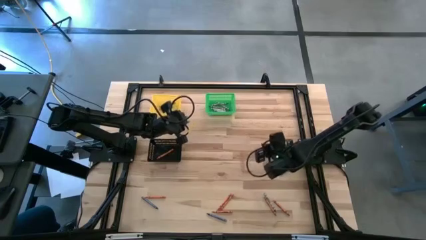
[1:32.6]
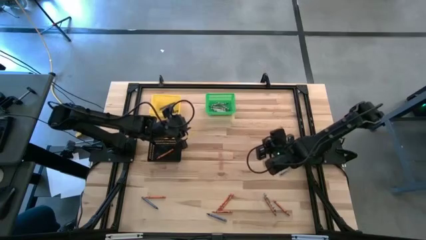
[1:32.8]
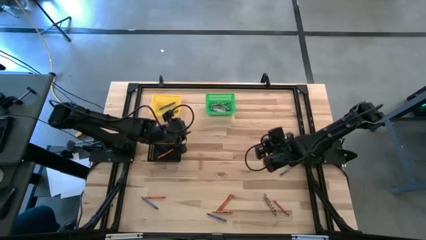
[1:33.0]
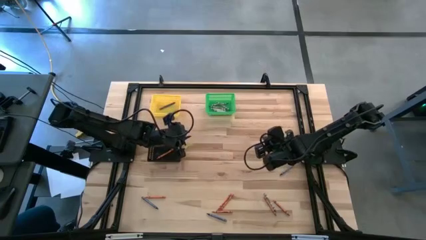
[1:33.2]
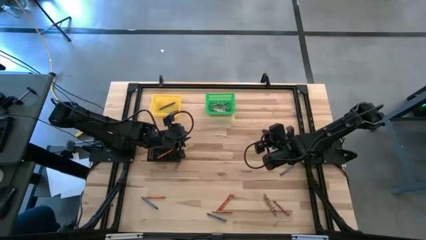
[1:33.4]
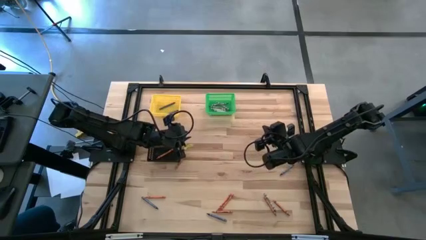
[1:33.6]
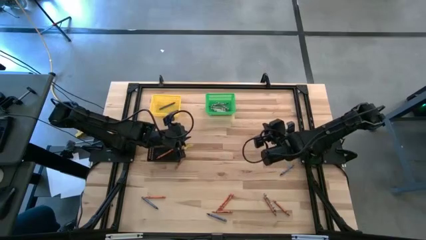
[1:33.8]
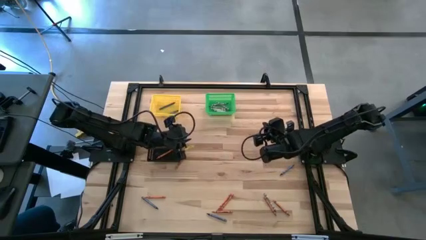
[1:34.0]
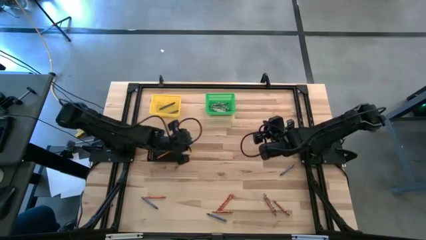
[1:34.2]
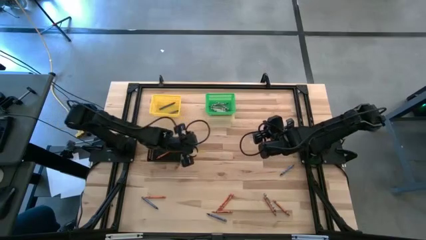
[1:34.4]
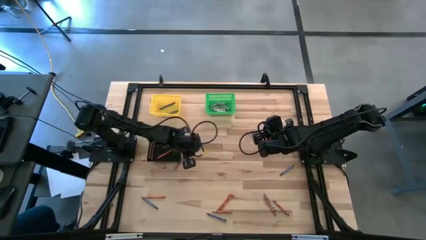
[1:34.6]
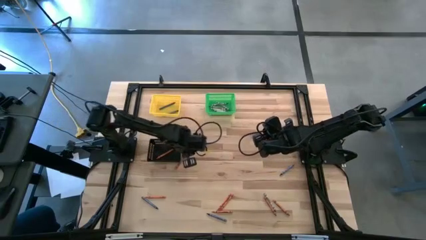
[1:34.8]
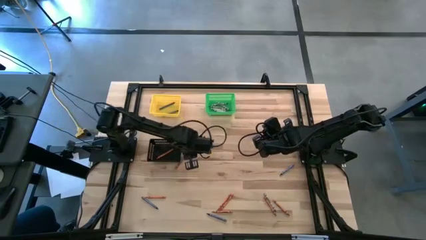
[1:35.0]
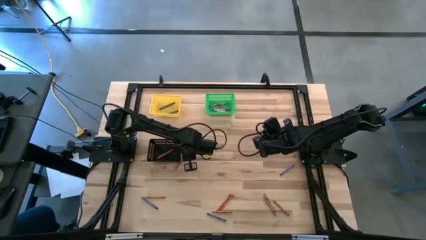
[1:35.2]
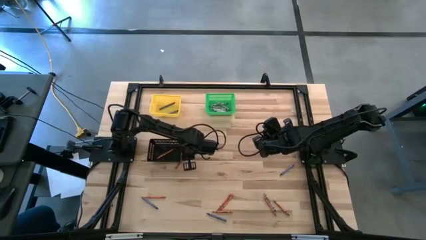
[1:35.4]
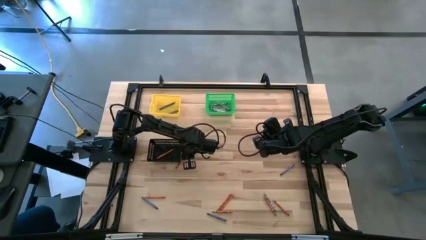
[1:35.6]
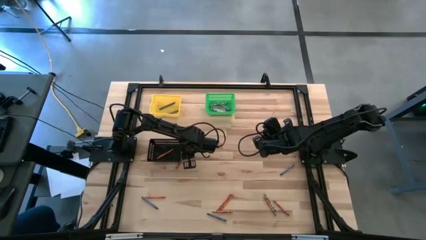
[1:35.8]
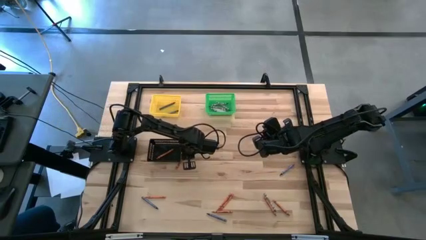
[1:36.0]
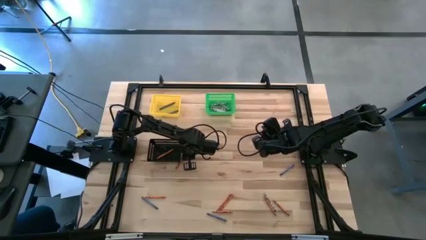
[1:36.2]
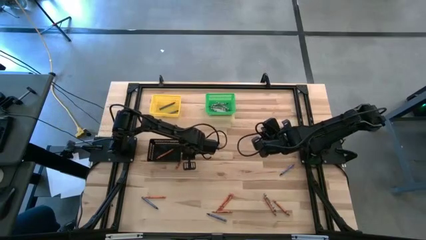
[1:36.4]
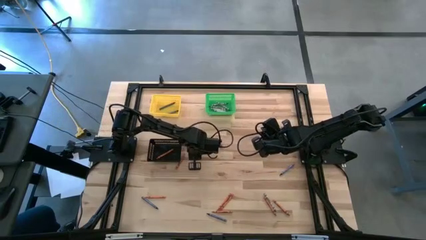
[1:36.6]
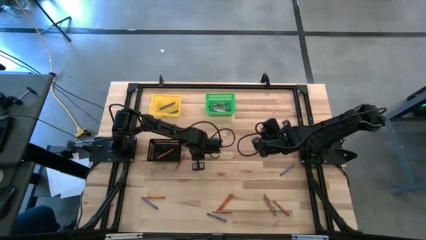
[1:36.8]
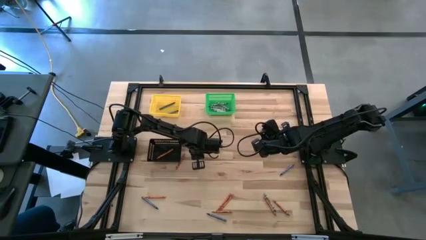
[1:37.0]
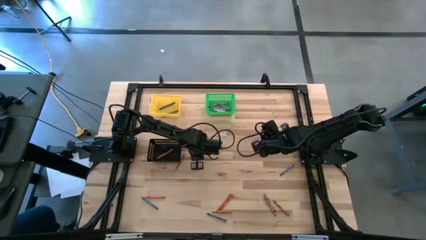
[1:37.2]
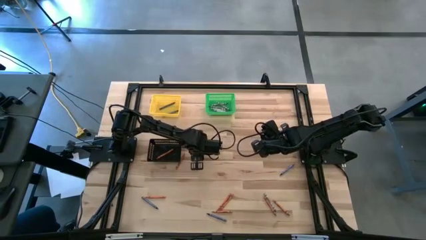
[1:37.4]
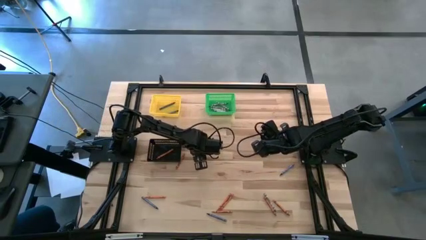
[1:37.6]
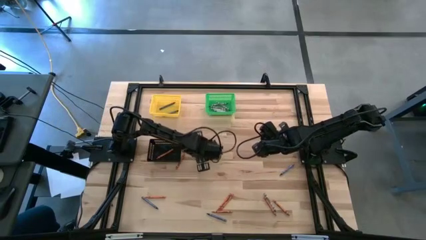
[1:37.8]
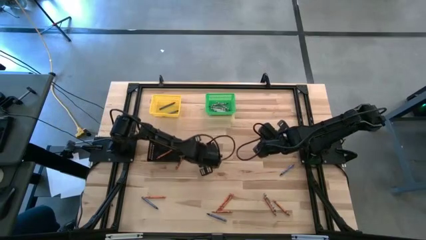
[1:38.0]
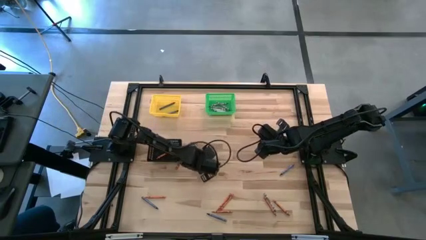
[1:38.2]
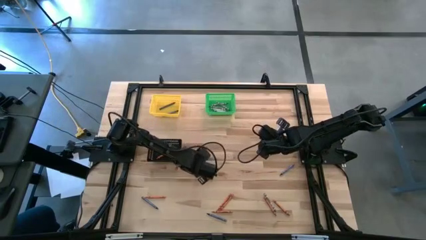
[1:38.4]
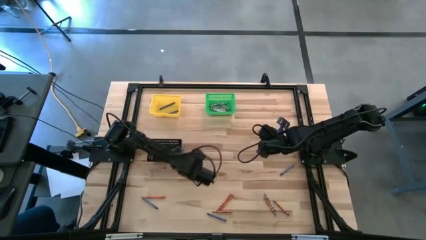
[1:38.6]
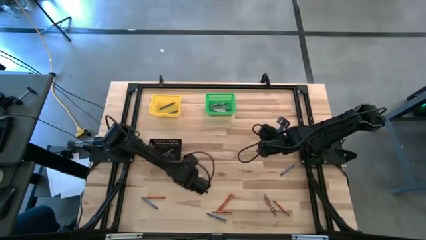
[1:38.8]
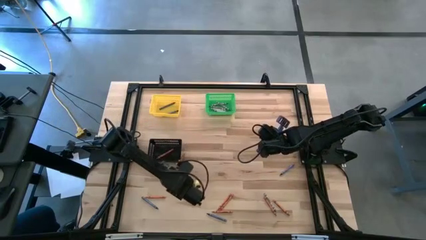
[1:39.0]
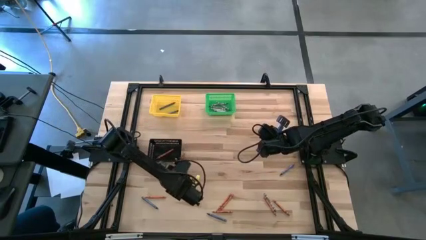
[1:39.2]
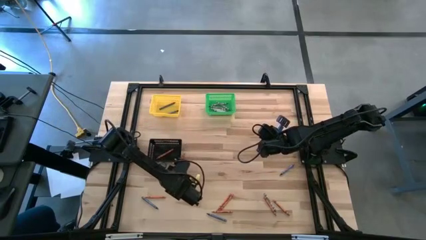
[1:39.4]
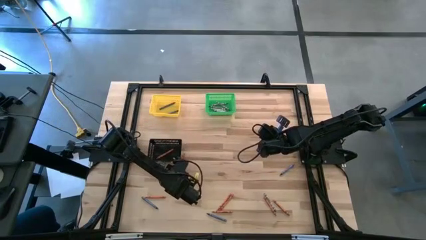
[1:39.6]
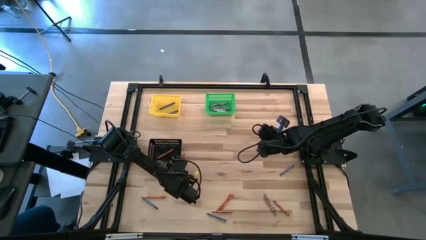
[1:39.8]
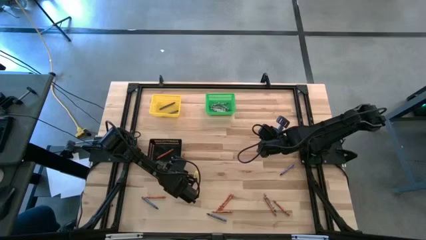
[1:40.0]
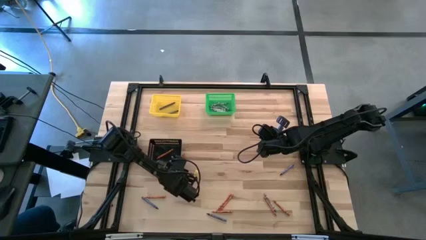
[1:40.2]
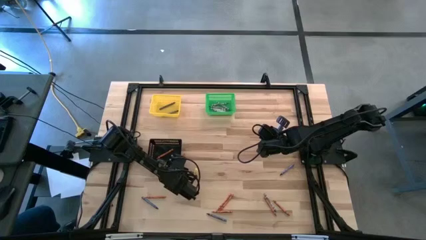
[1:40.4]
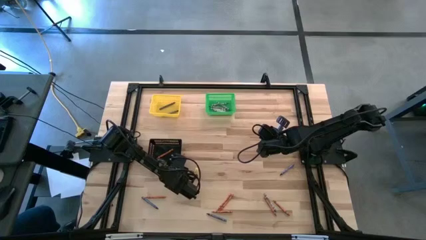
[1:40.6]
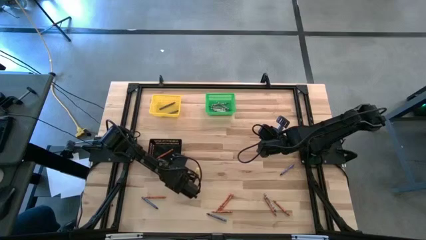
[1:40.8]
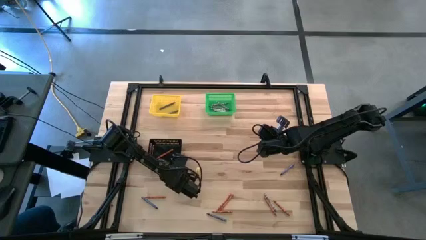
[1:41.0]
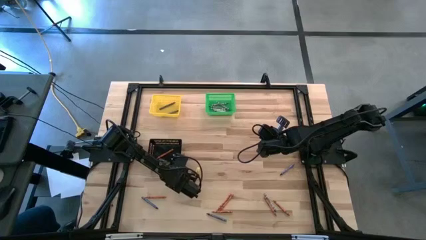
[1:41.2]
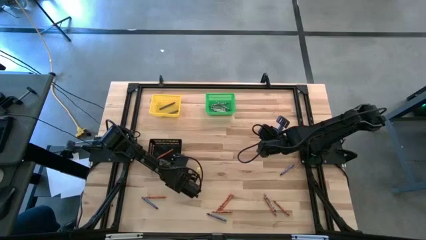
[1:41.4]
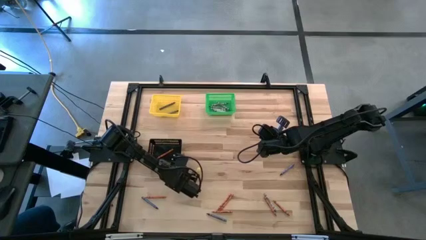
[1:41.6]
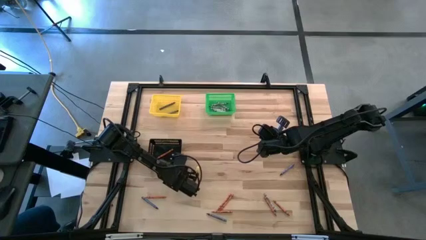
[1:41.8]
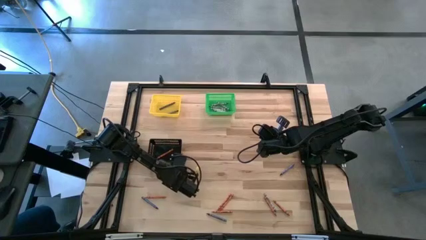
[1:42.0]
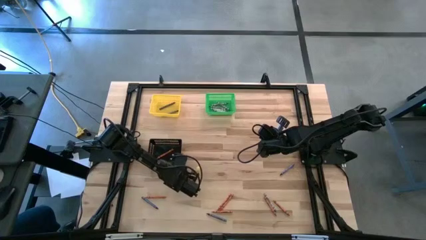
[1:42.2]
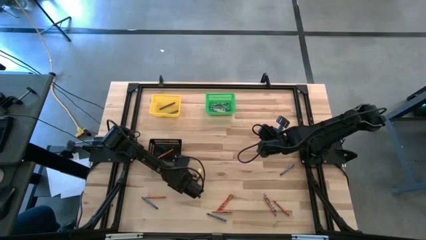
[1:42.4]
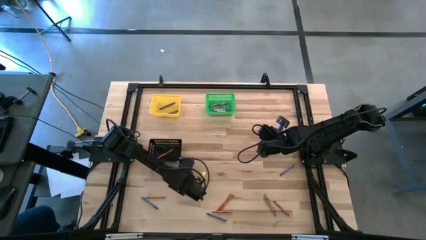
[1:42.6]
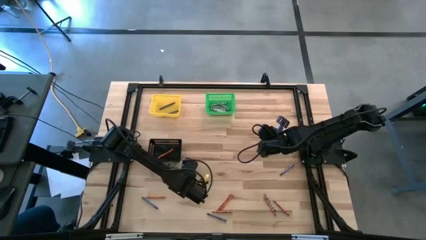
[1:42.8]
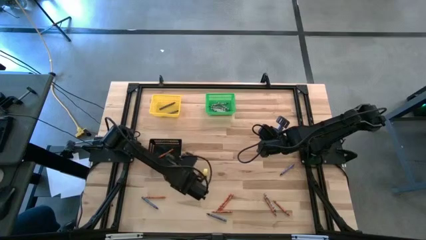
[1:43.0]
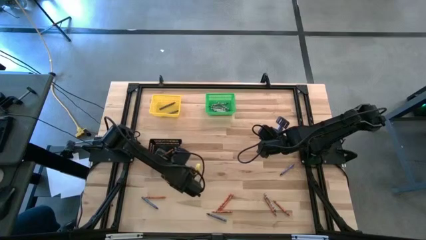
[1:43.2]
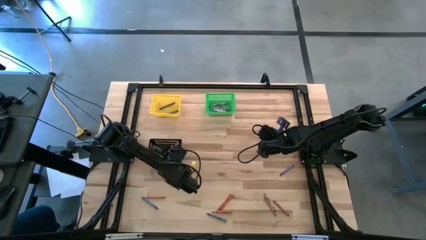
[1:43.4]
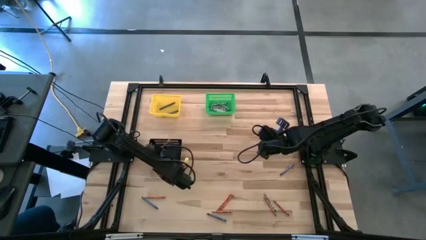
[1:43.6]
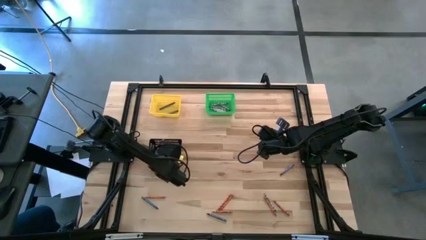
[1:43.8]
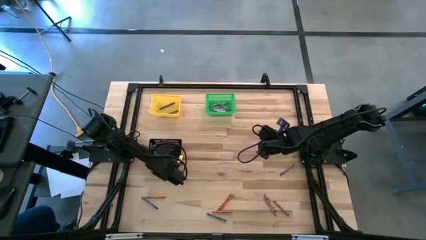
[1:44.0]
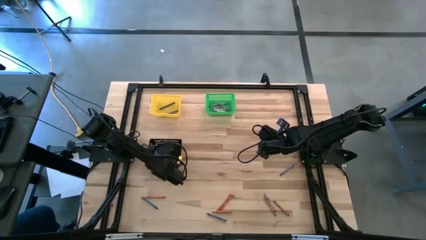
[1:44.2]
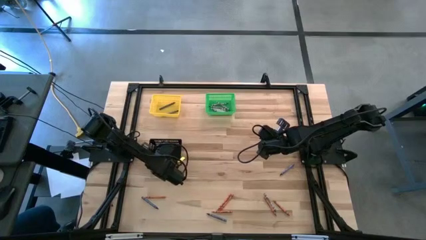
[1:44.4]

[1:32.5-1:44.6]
Task: Sort crayons
Put the orange crayon into the black bin

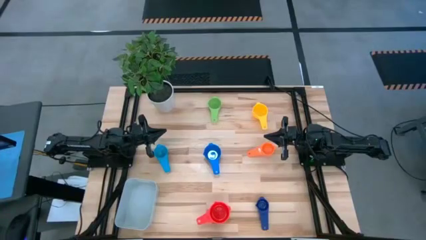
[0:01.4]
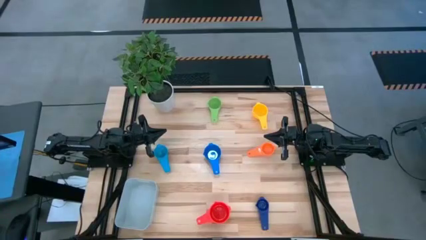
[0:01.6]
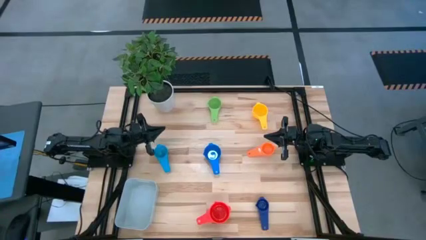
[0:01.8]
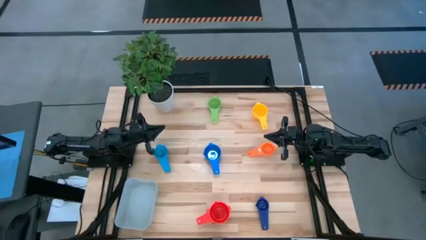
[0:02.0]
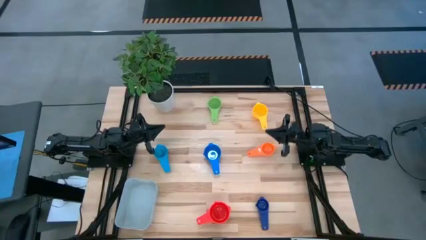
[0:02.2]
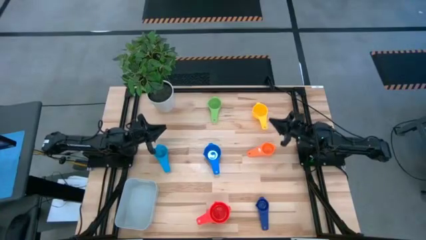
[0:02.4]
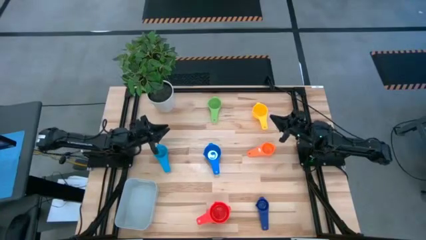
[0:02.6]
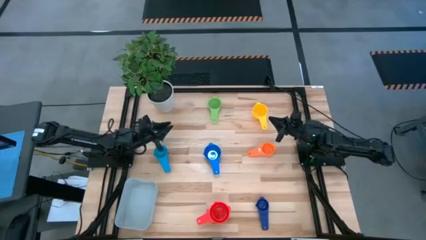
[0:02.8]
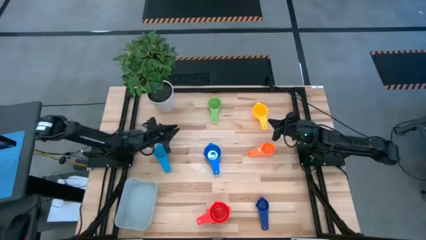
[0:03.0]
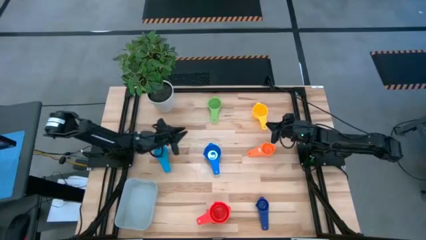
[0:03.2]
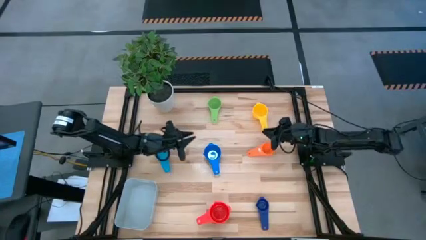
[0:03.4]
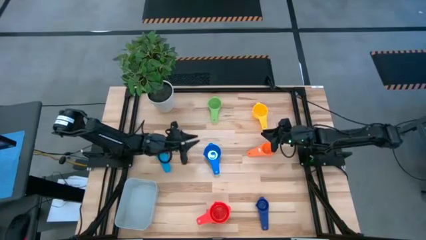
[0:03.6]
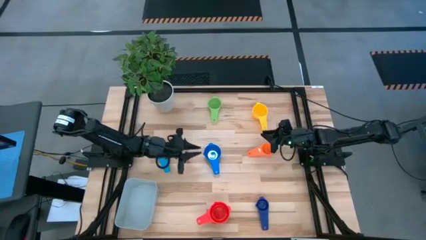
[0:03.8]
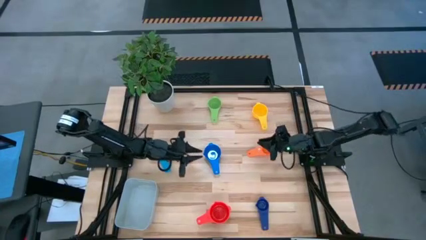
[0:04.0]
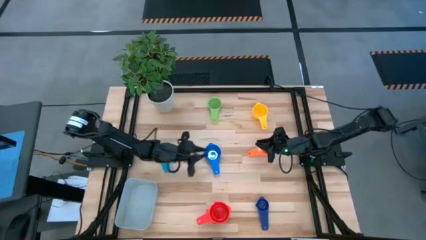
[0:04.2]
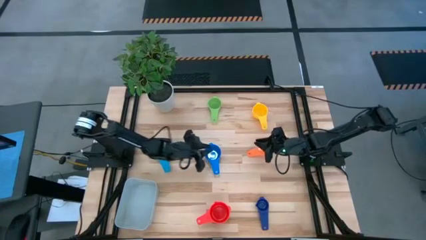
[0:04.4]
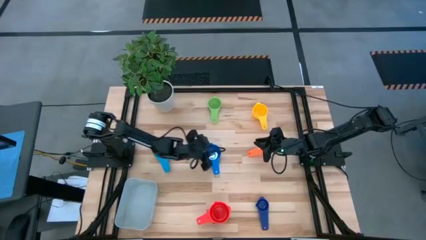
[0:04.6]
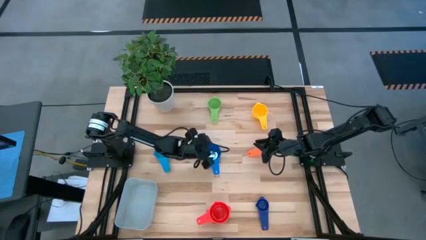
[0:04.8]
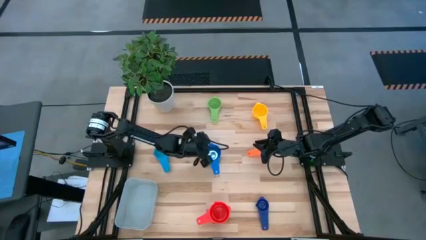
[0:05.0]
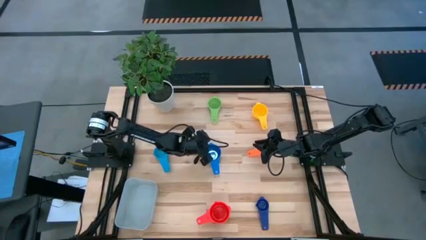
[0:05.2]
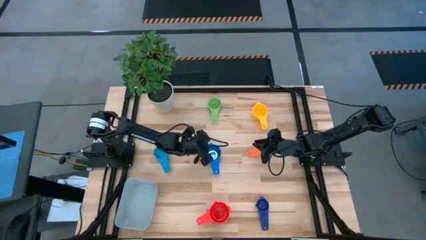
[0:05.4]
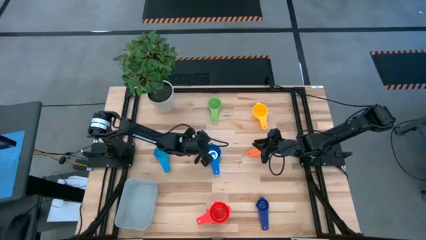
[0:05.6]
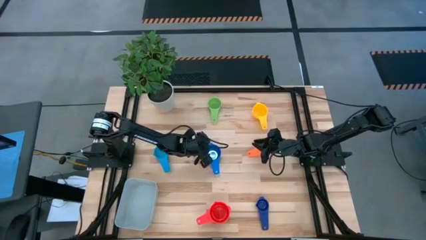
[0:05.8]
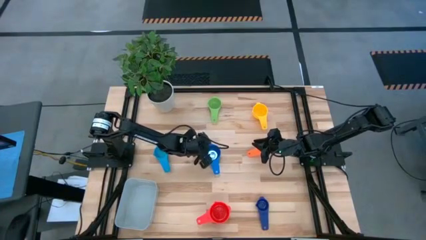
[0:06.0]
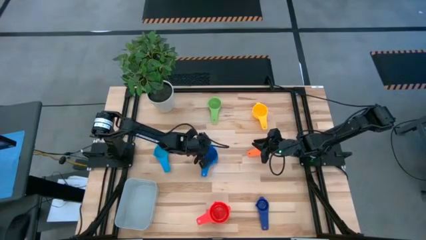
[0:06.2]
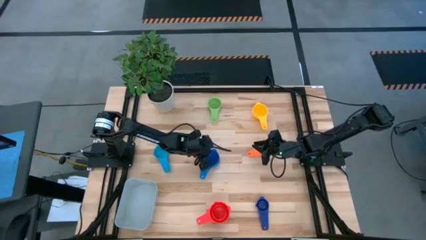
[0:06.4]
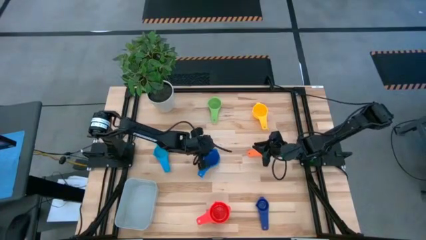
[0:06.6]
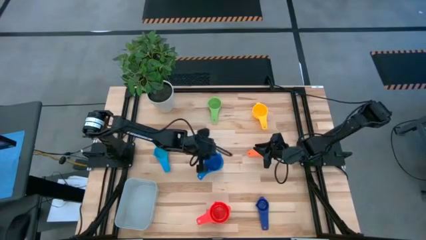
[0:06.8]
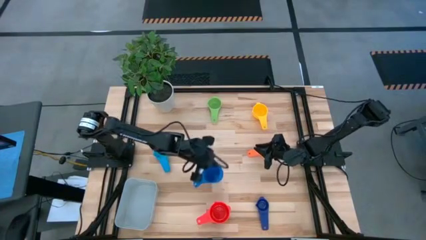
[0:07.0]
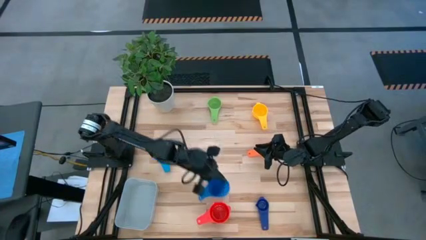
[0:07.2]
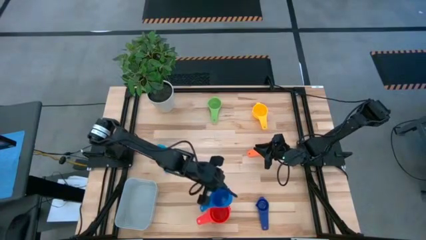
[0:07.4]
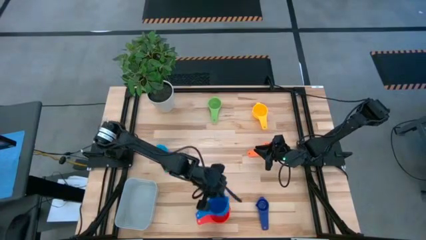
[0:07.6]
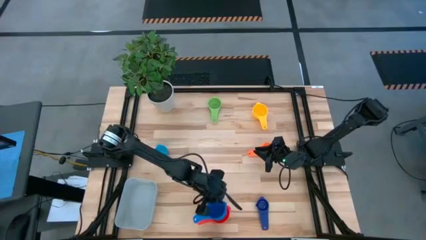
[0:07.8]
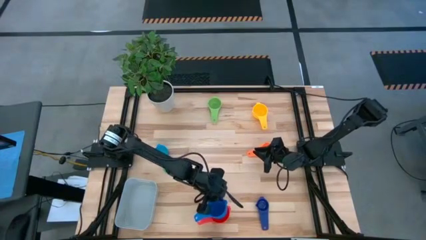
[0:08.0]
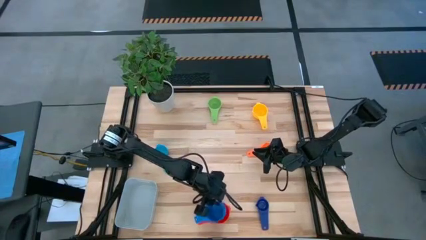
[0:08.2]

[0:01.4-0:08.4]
Task: Nest measuring cups in basket
Stack the blue measuring cup on the red measuring cup
